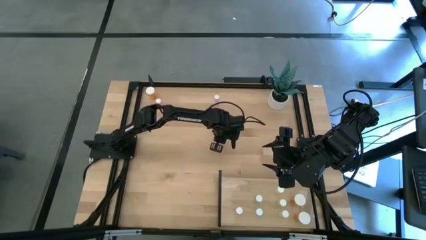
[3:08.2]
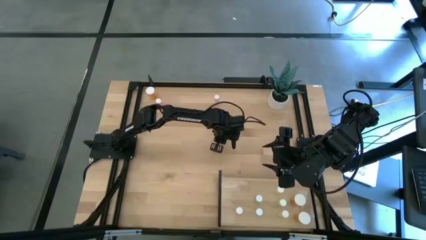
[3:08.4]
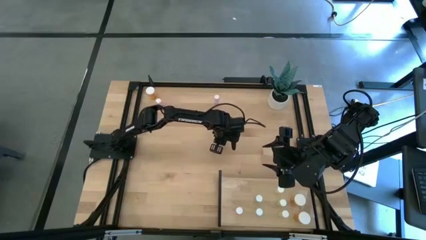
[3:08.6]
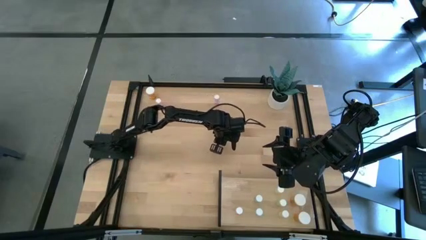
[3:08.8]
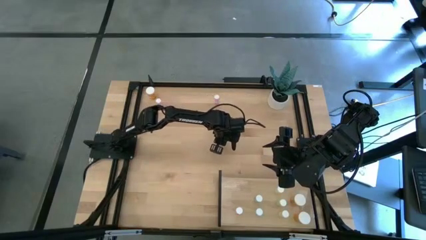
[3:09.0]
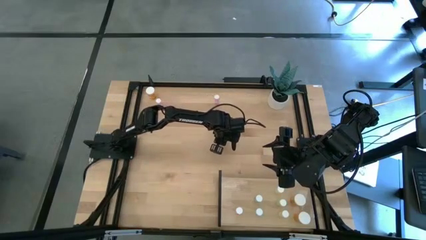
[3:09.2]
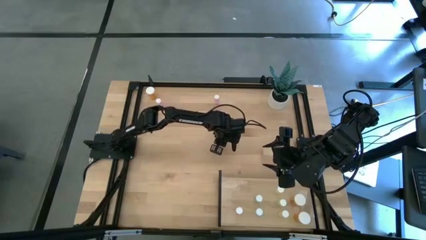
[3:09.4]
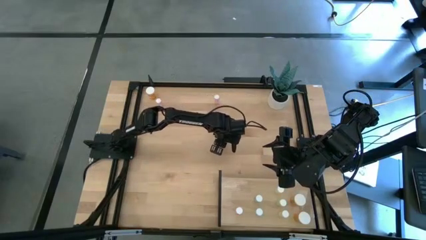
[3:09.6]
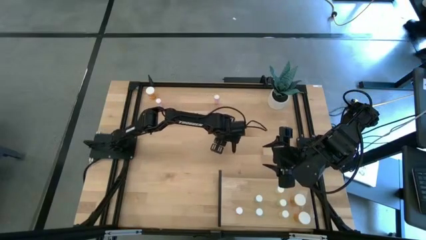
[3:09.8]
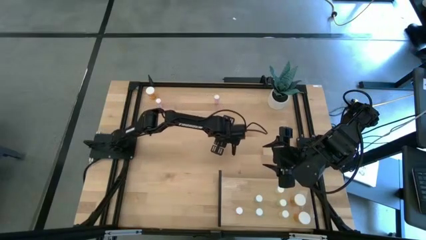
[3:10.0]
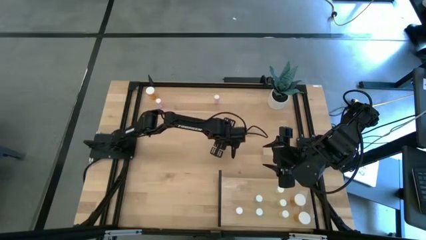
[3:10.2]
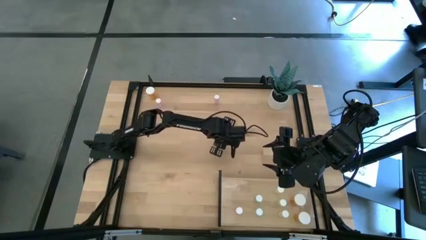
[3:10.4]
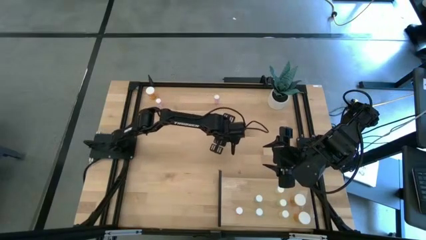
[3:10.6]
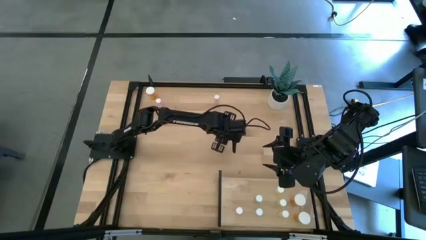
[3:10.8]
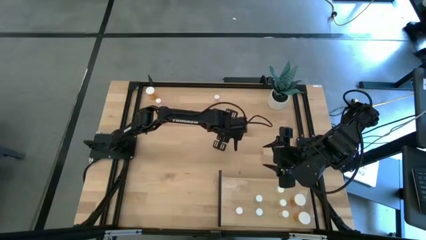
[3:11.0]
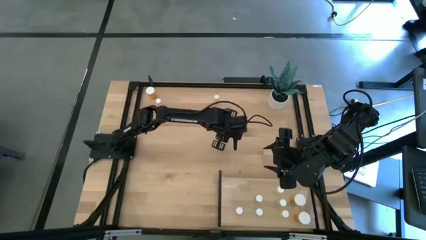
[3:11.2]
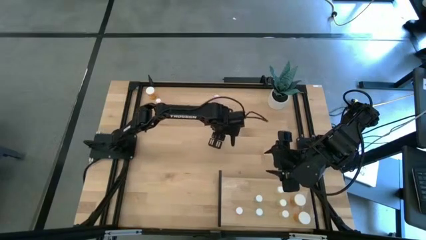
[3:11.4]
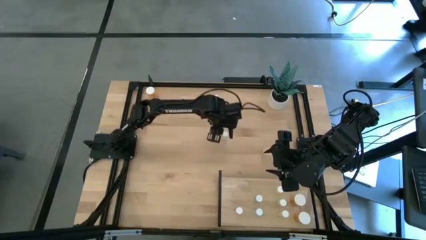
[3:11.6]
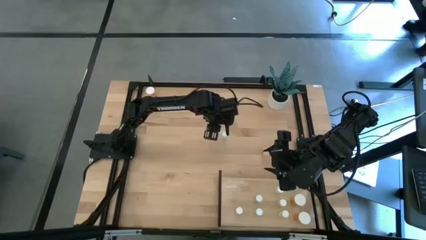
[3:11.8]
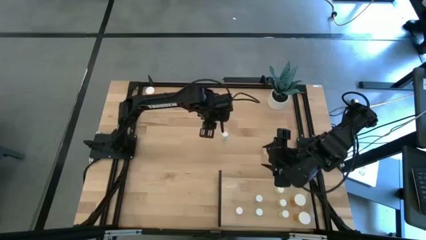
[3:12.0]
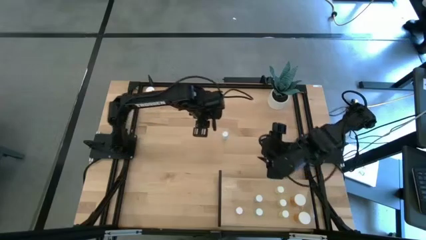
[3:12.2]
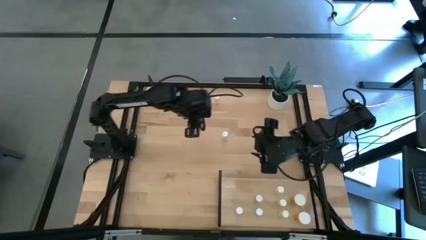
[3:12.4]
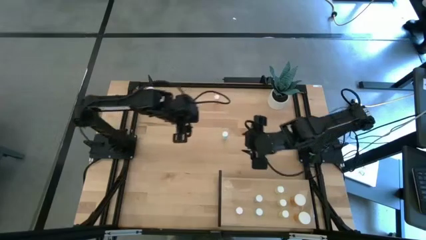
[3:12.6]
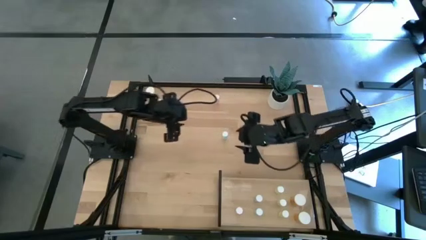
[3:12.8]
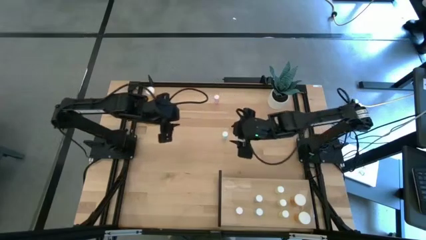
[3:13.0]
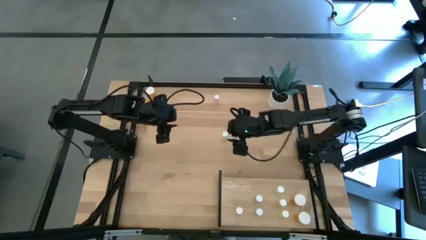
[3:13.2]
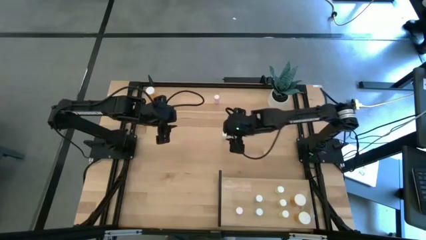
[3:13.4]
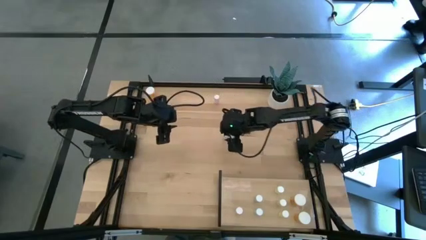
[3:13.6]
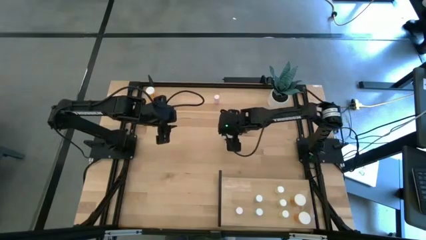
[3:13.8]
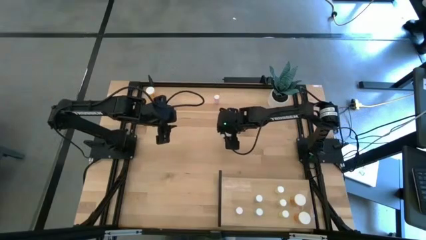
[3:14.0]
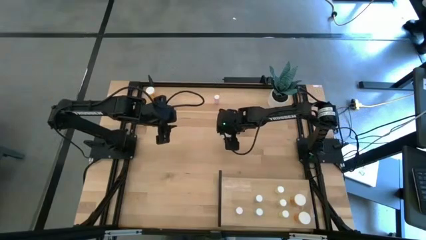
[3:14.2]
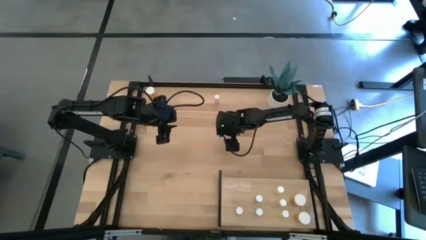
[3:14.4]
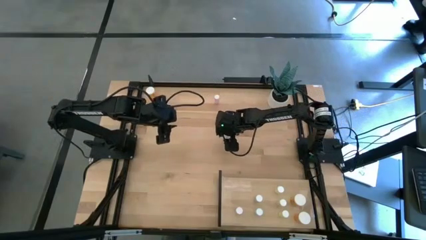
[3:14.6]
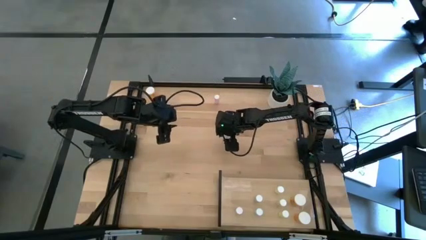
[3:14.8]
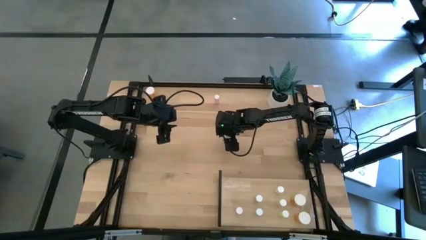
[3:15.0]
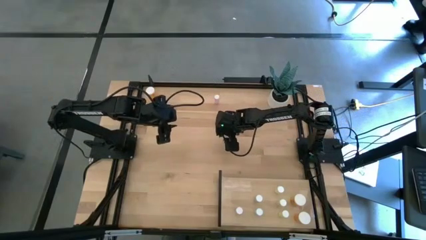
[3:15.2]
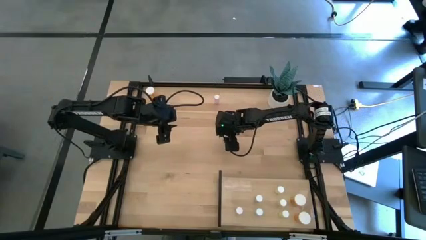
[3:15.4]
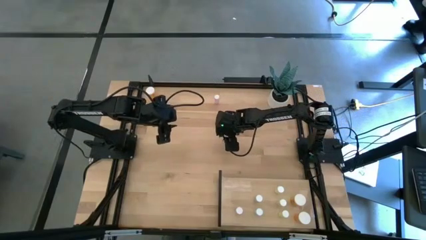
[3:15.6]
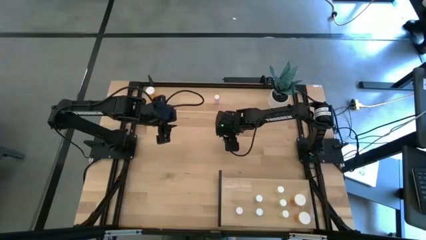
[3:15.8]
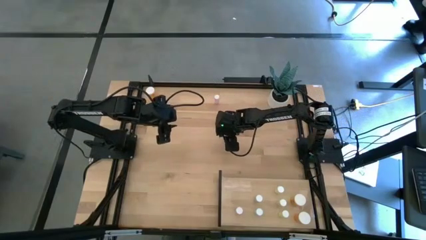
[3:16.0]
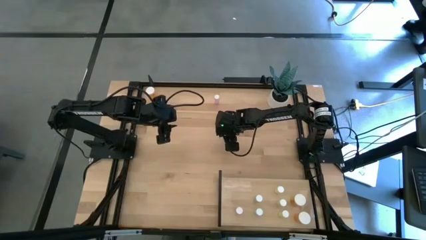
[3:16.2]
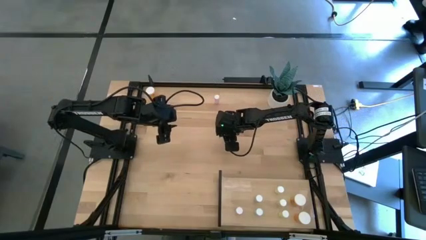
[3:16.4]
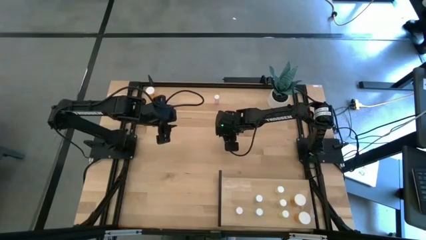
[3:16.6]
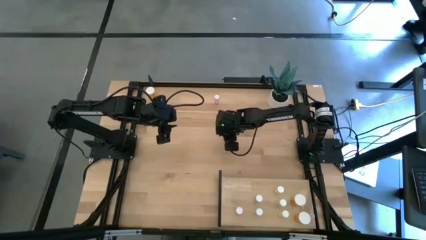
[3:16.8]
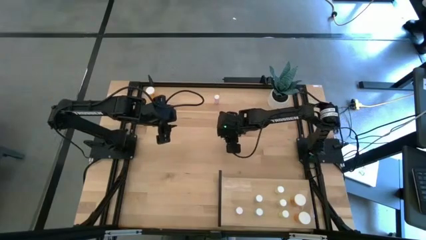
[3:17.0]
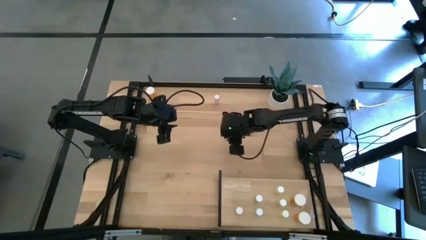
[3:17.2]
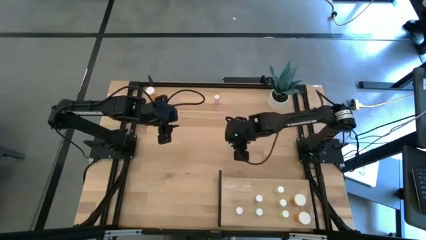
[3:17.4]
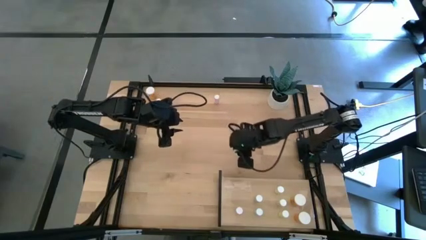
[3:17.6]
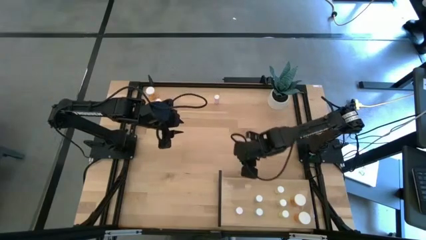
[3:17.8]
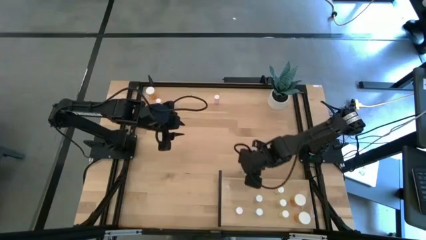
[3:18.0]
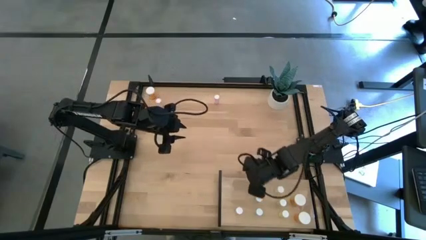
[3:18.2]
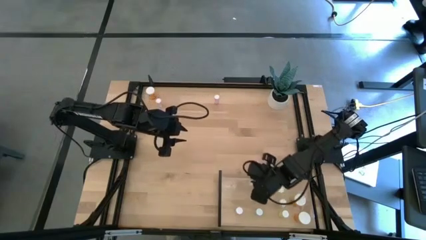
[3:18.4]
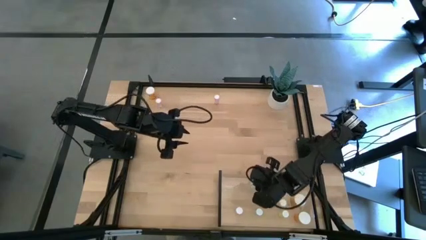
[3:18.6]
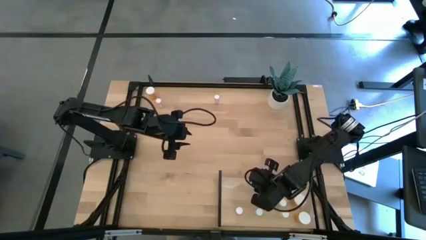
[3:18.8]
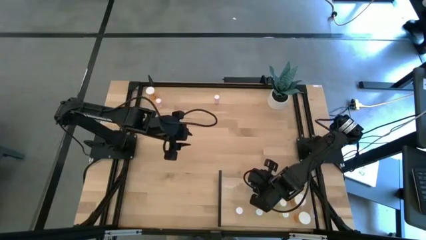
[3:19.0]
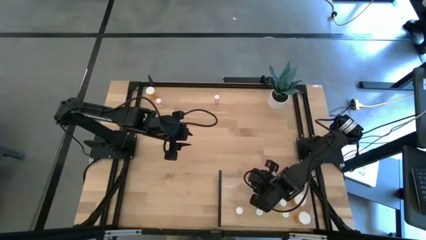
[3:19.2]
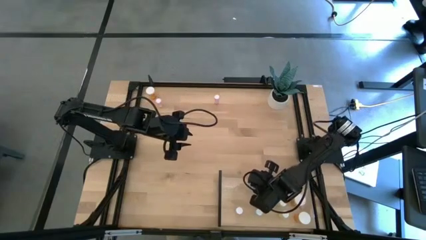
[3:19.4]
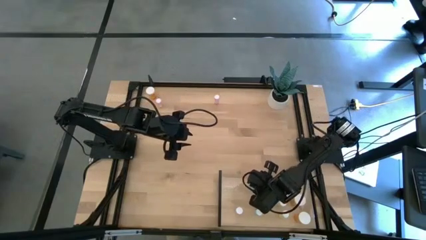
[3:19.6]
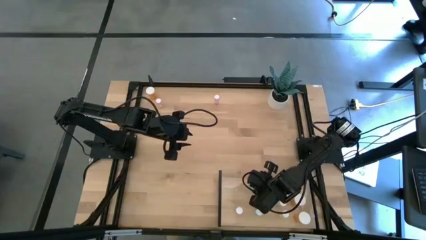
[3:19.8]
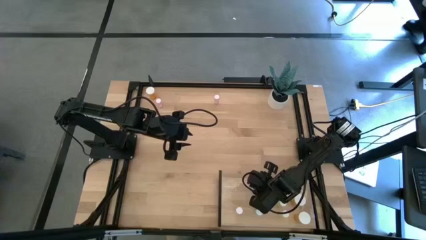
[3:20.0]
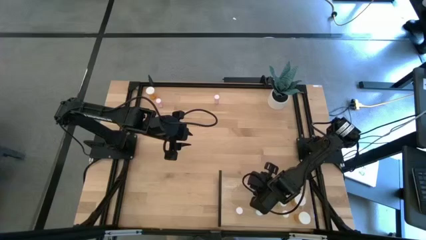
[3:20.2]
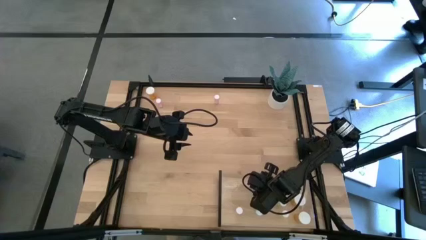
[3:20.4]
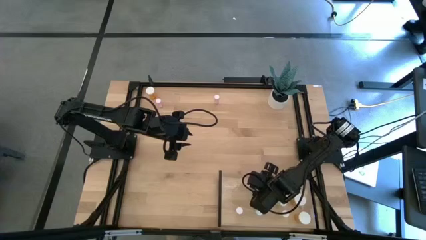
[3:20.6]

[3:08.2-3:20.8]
Task: Pick and place medicine bottles onto shelf by color
Put the green pill bottle on the shelf aligned with the other green pill bottle

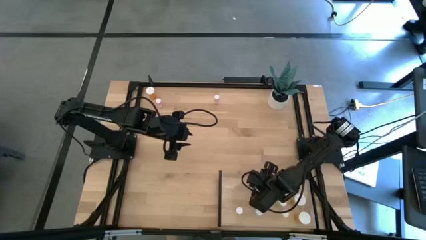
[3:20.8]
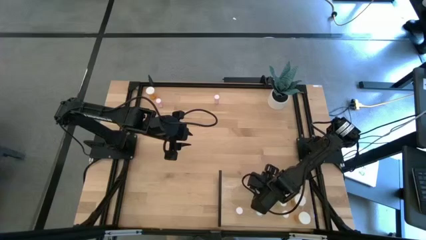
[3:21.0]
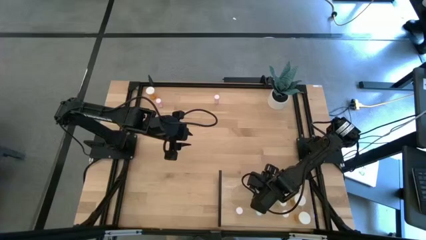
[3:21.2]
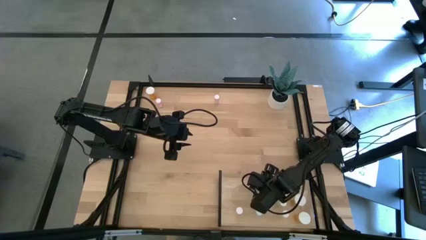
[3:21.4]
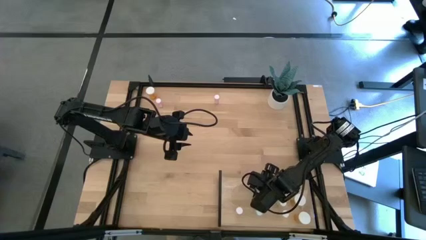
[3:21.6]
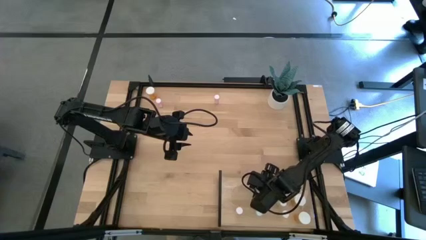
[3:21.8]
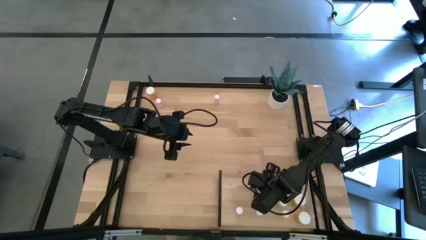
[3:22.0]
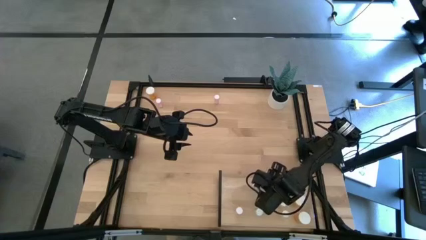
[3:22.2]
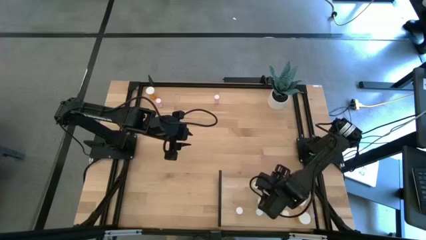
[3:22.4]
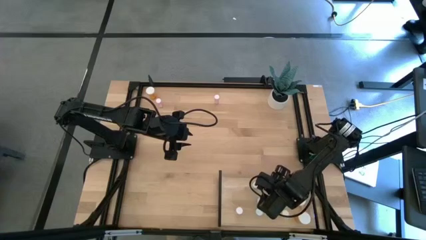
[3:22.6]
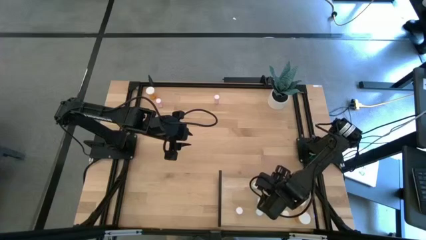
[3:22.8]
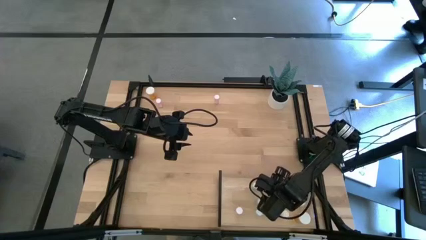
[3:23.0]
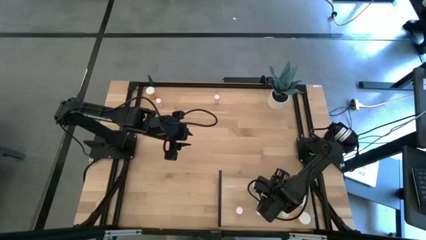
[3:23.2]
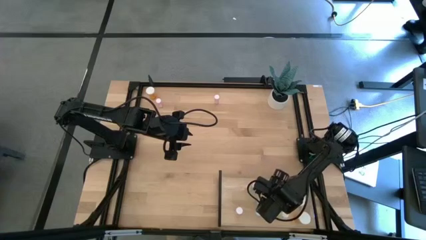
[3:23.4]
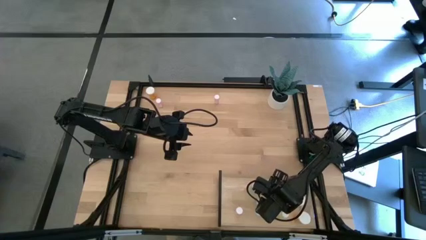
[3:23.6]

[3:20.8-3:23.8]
Adjust the green pill bottle on the shelf

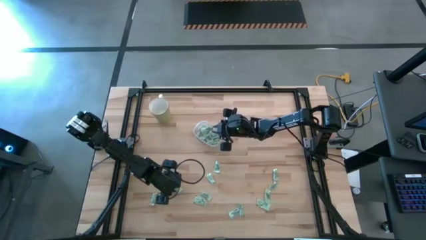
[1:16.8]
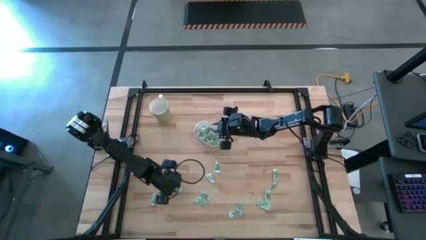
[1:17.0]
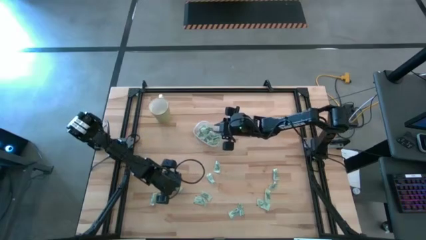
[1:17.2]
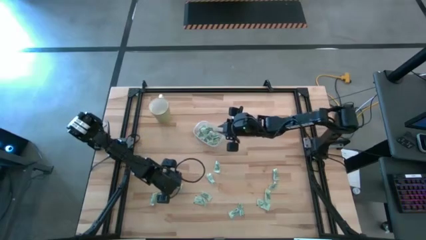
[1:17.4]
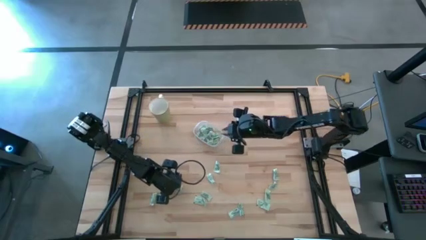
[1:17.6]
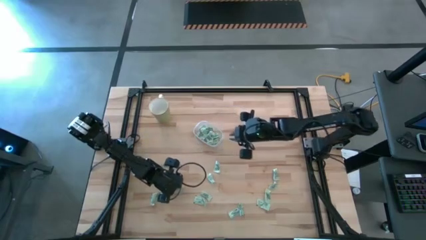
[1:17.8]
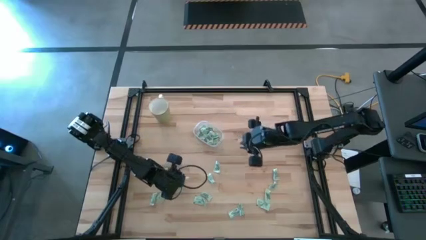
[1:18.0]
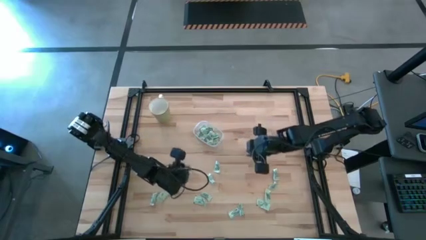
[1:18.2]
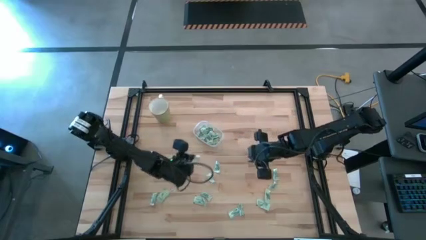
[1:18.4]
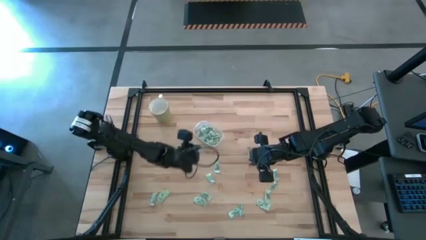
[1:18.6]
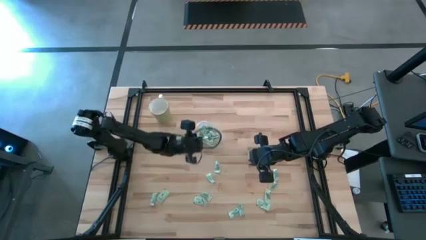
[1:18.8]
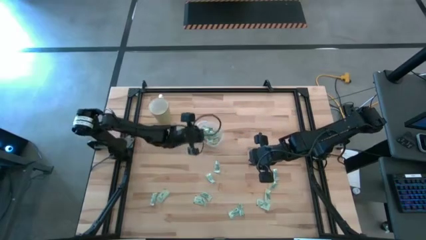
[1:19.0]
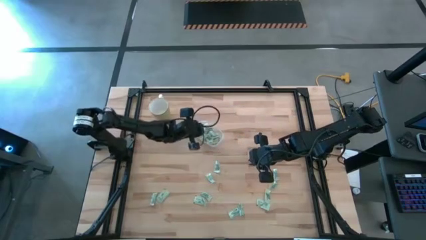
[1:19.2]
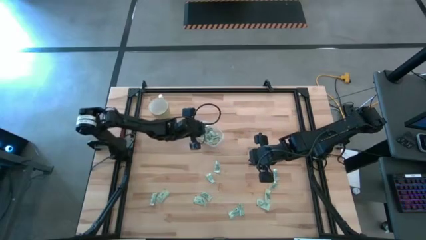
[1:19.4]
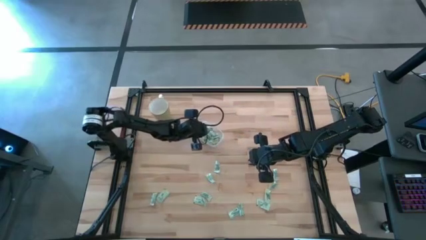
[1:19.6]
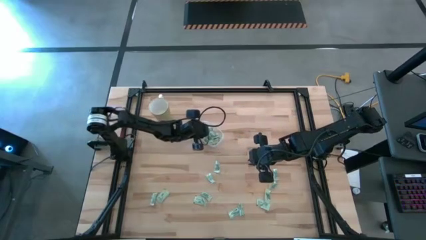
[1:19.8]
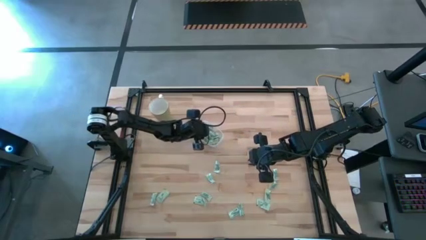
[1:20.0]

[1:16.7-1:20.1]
Task: Pick and place Stevia / Truvia into bins
Put the stevia packet into the transparent container
